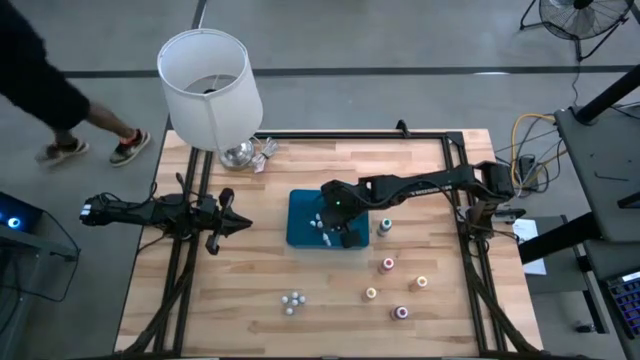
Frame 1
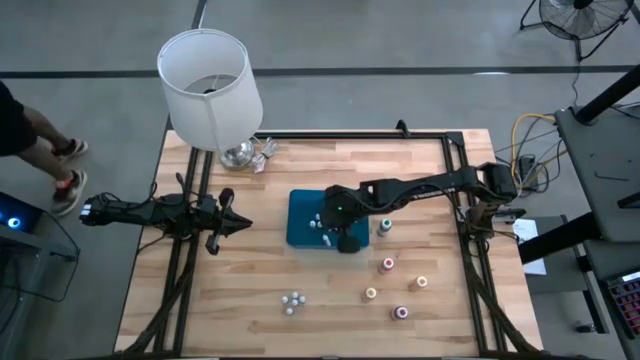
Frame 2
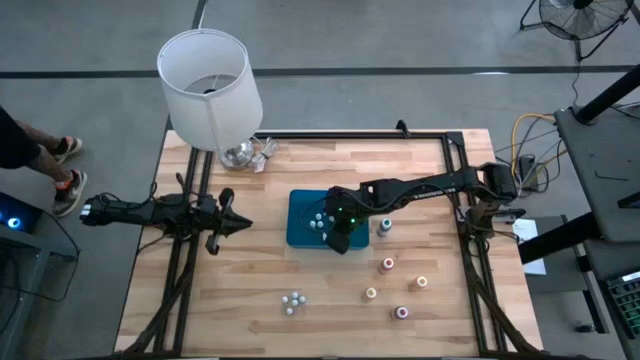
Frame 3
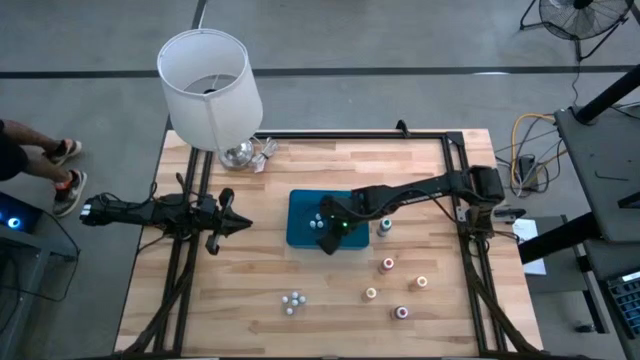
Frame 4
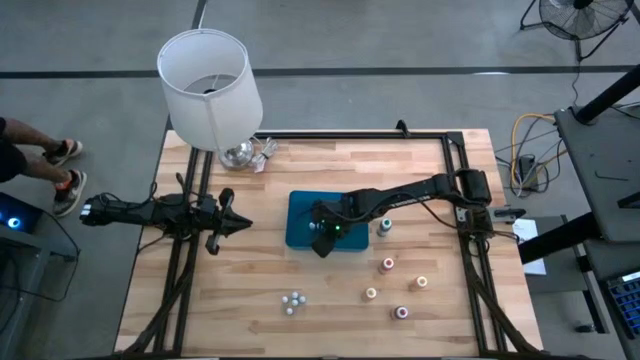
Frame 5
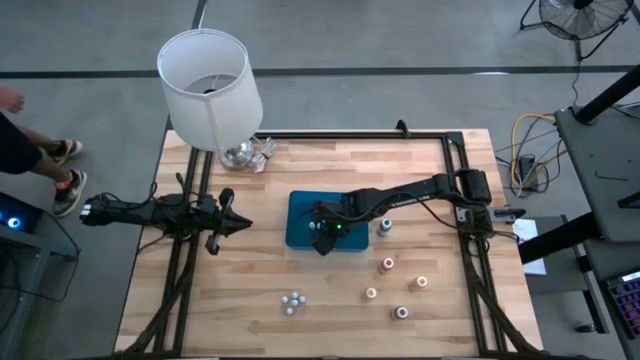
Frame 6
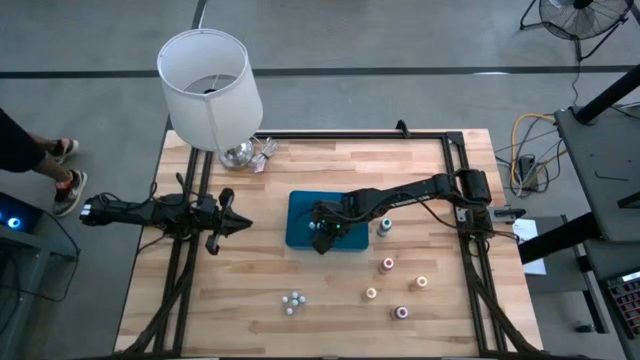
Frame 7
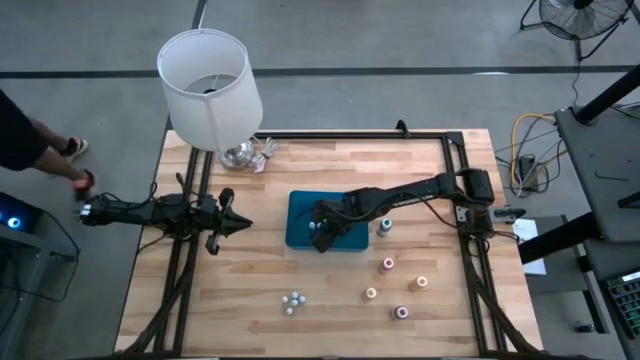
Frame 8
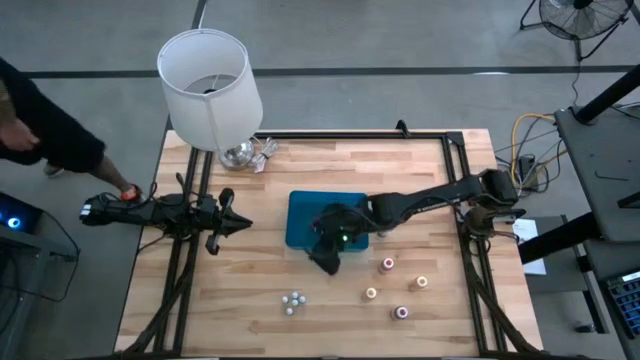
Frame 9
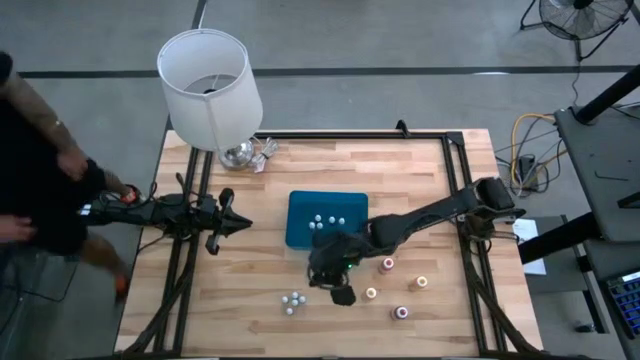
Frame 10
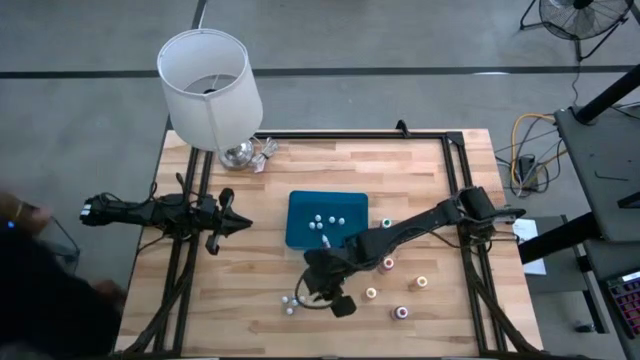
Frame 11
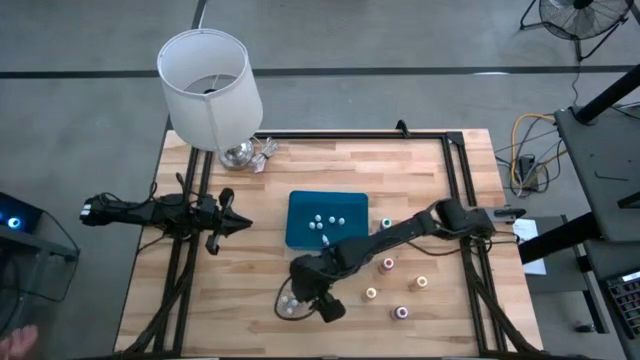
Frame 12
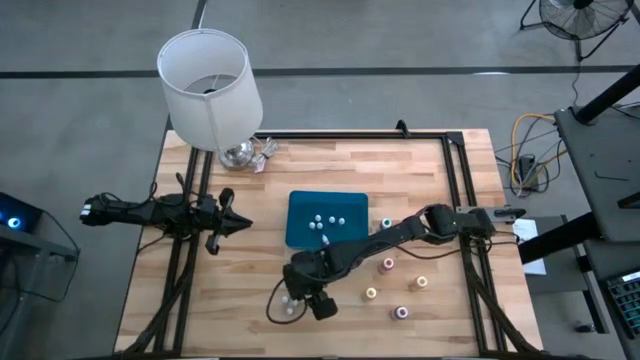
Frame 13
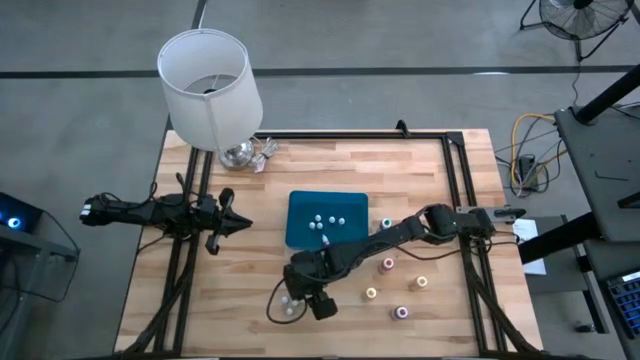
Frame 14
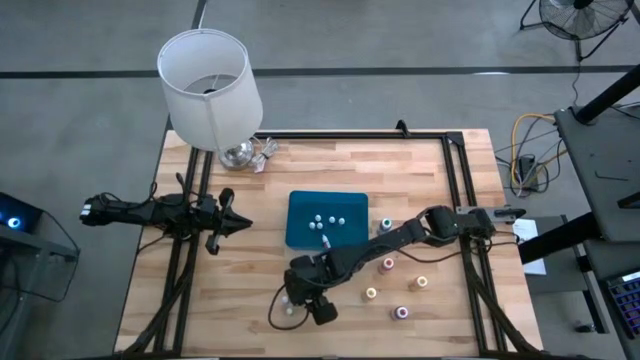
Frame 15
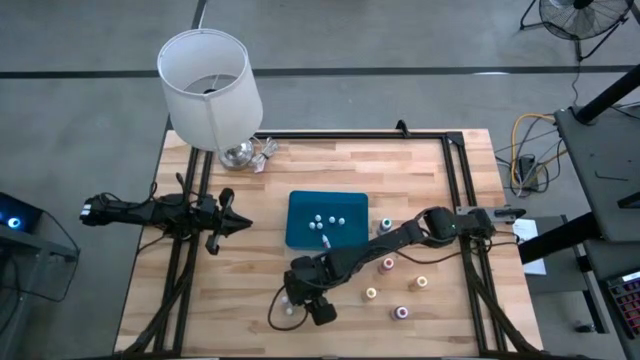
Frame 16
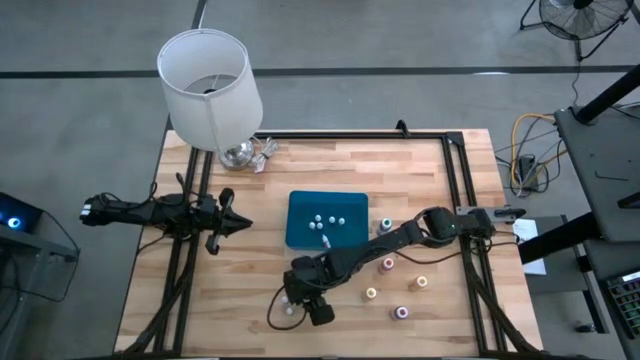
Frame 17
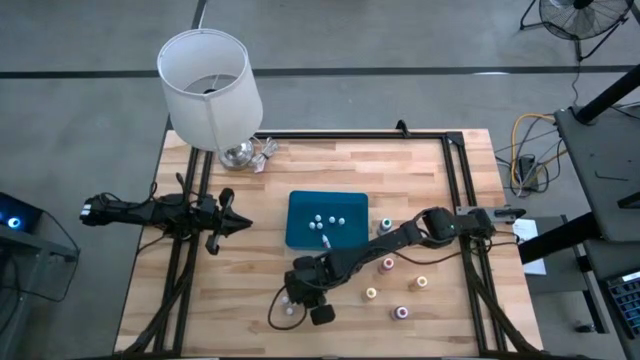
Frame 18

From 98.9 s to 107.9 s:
Task: Pick & Place food coloring
Put the small red food coloring bottle into the blue bin

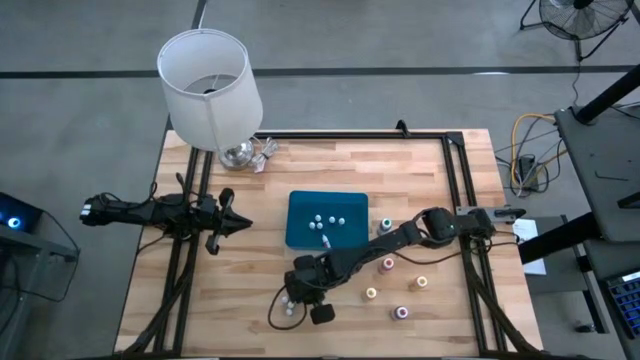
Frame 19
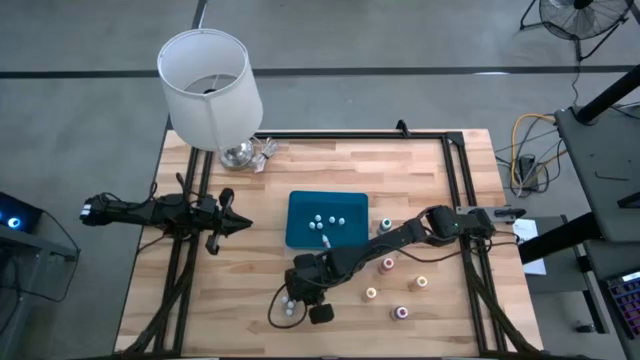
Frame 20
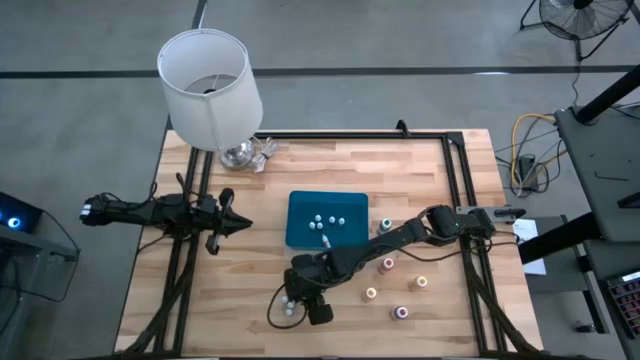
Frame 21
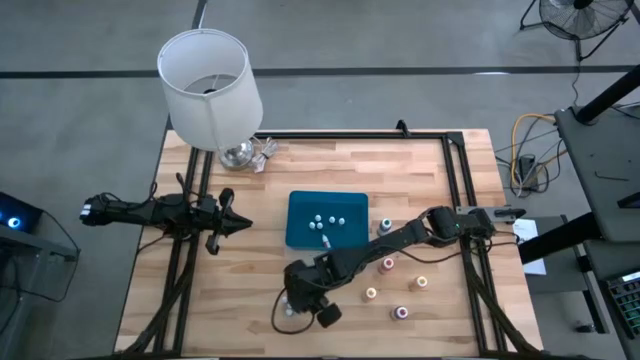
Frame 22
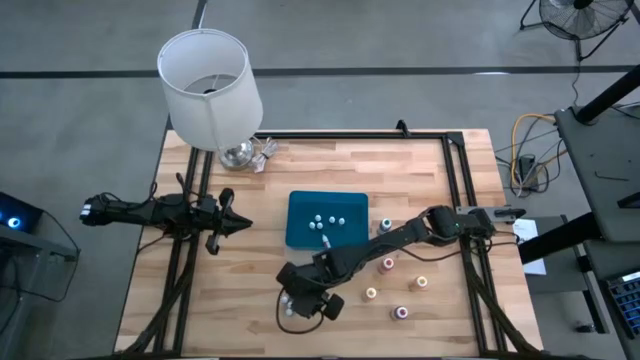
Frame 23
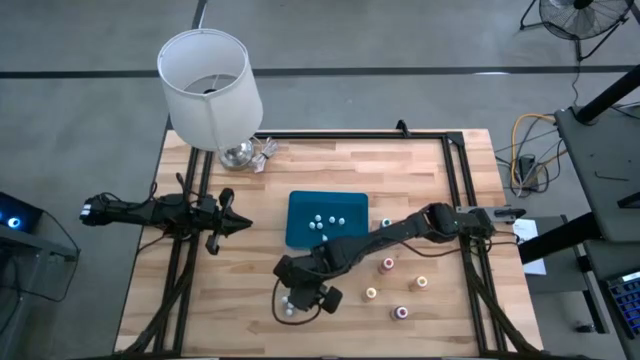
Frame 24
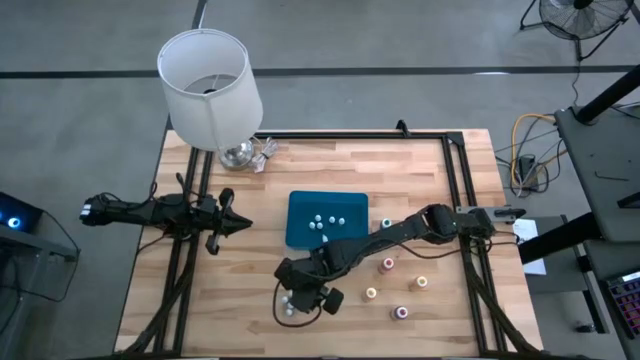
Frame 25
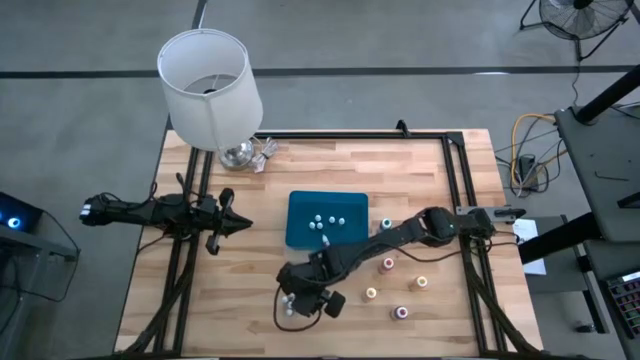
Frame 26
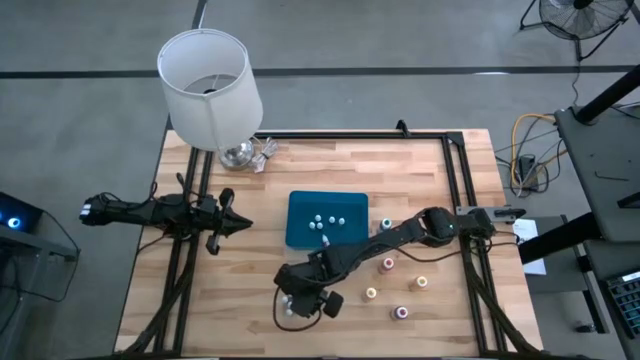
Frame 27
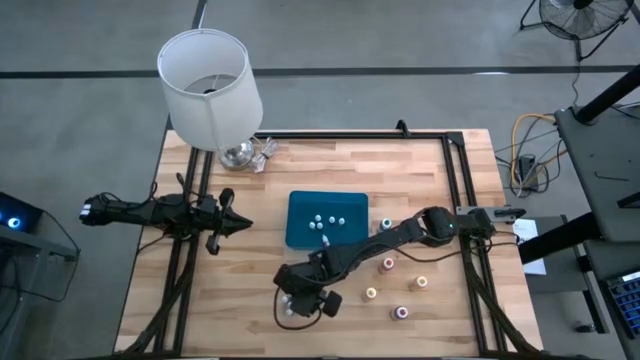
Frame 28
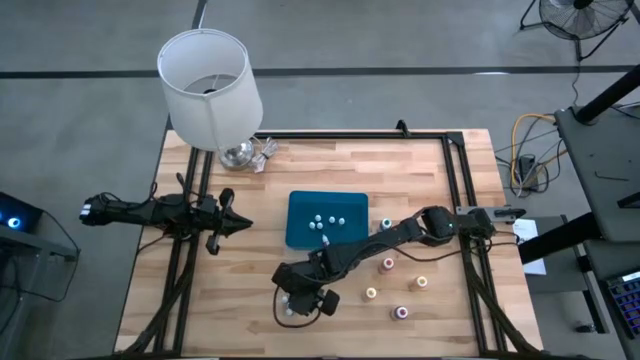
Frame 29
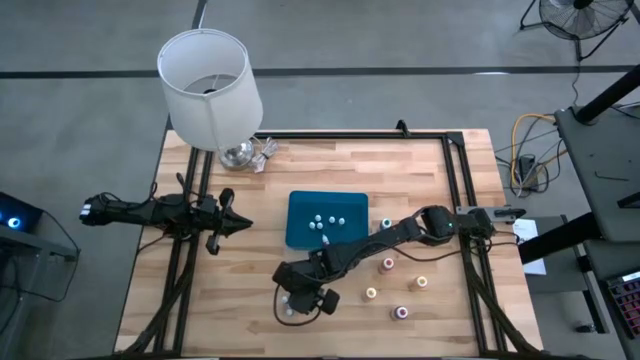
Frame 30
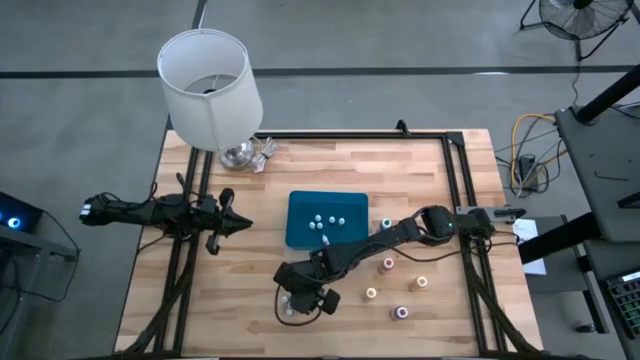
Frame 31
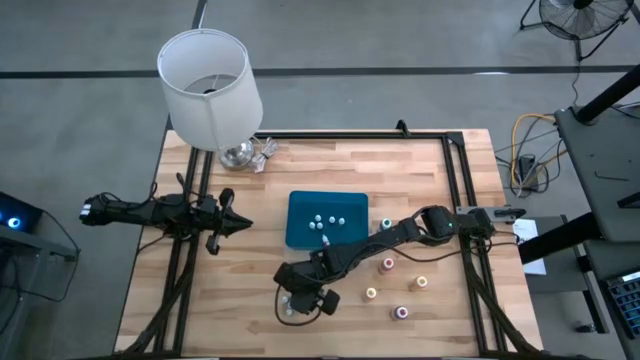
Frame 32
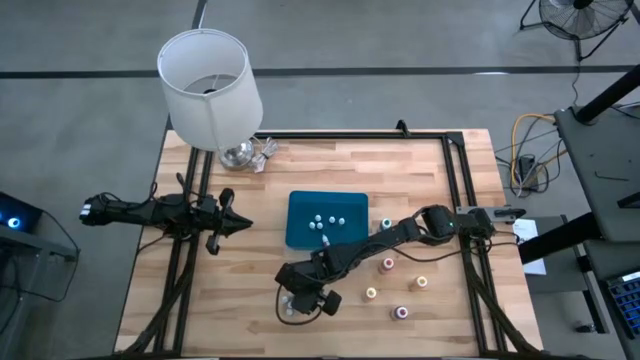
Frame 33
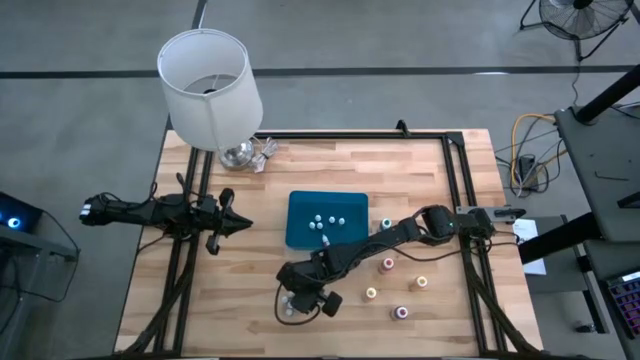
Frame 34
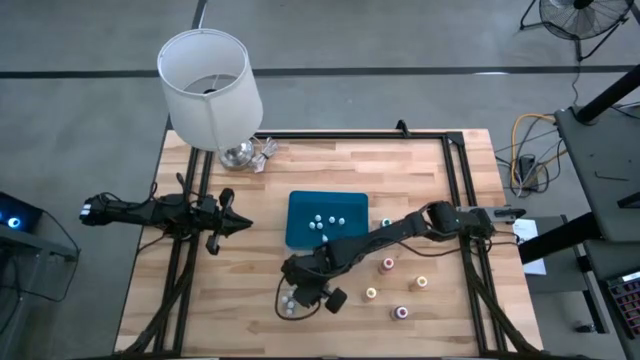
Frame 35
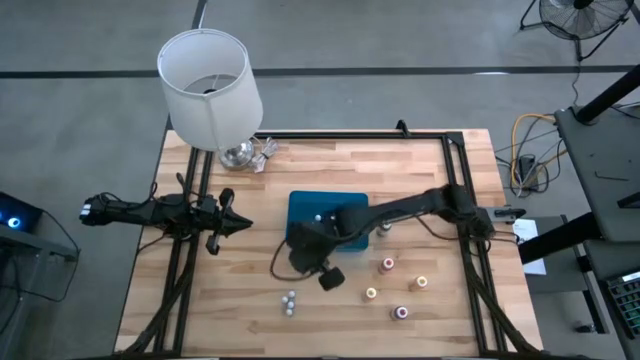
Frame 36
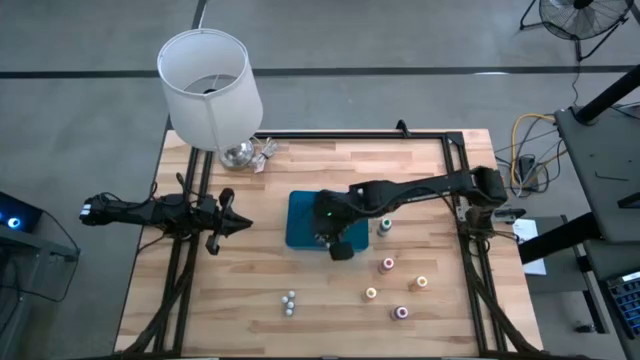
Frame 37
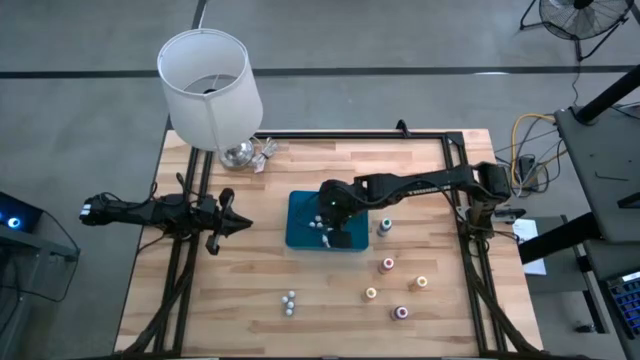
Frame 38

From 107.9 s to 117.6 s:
Put the small red food coloring bottle into the blue bin

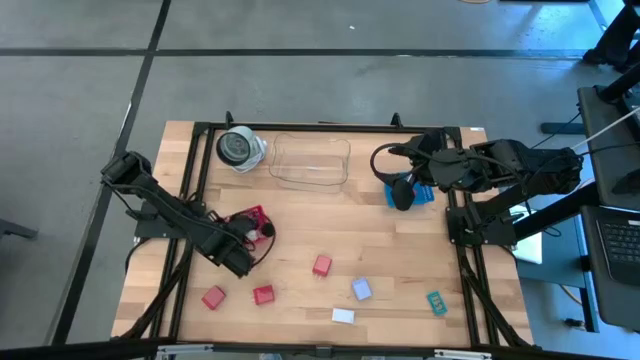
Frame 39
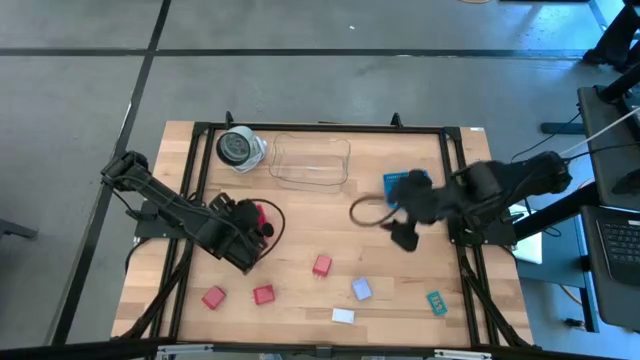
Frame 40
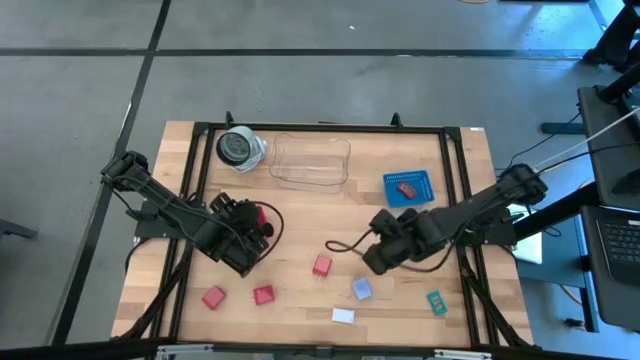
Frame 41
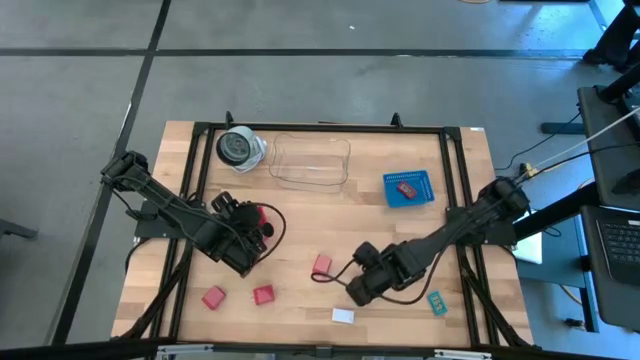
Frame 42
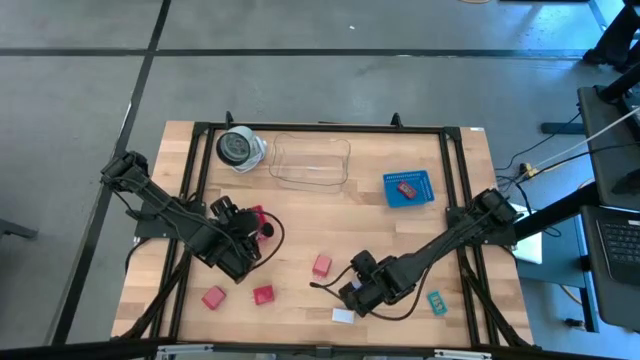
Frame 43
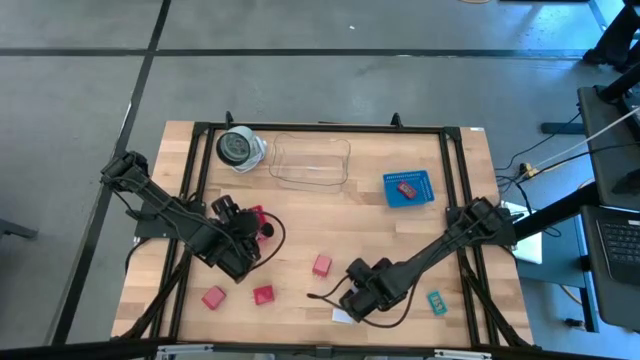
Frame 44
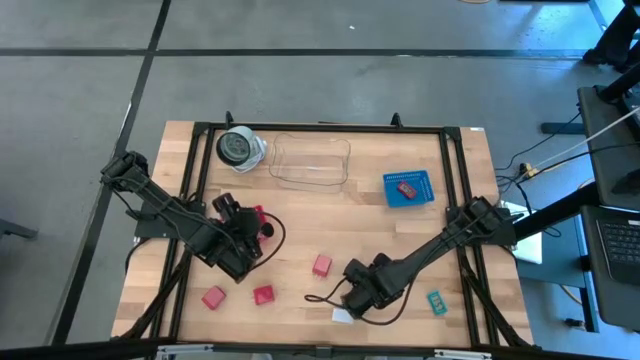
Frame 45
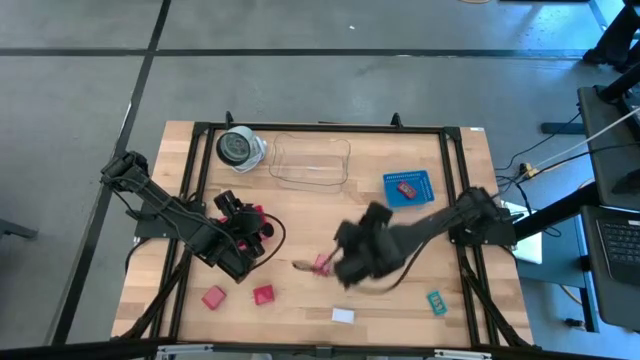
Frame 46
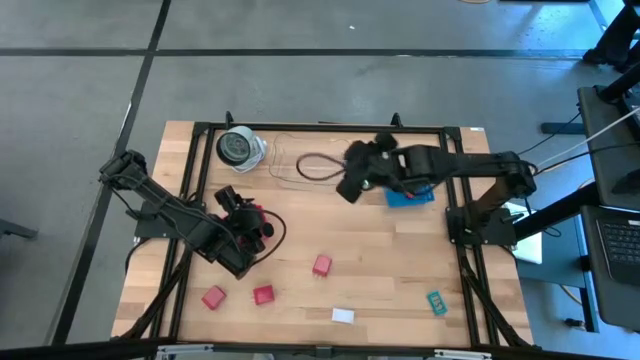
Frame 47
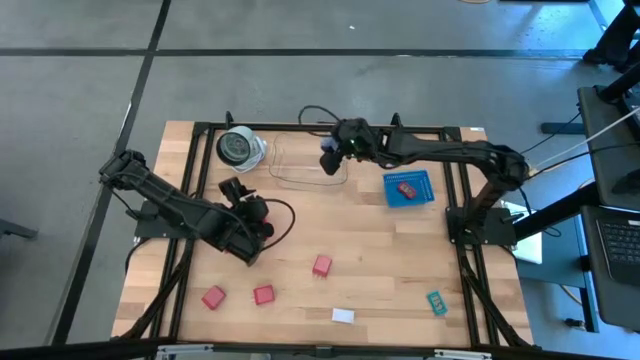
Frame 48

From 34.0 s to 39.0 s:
Task: Pick & Place Office items
Put the blue charger adapter into the transparent bin
